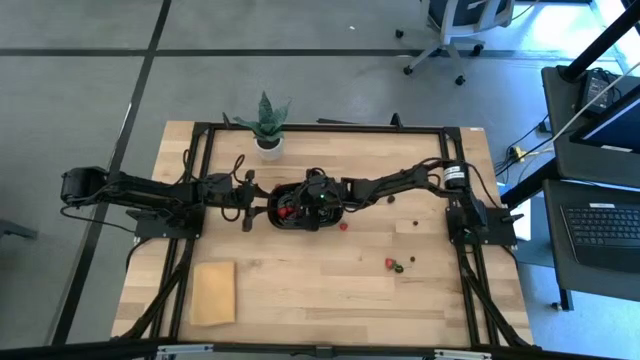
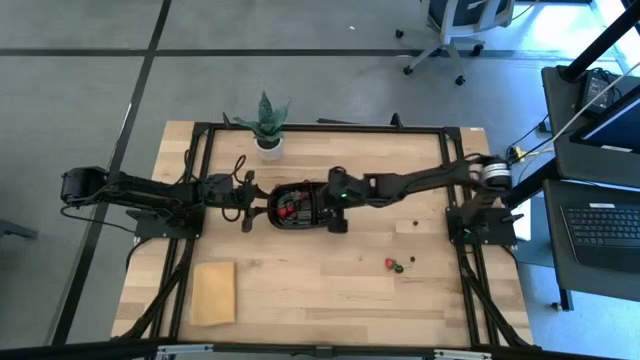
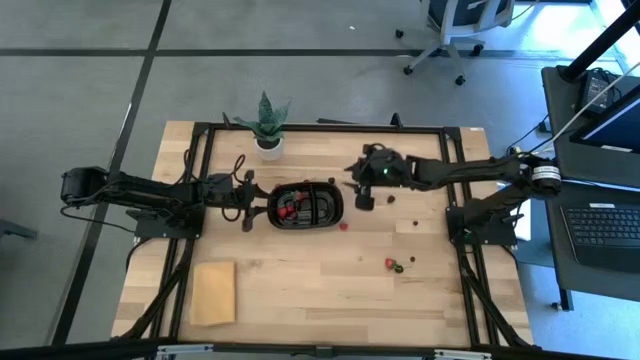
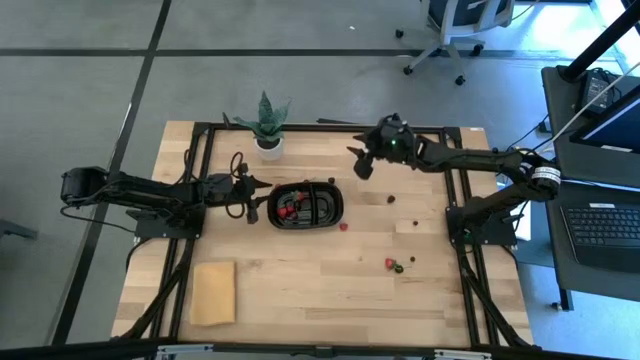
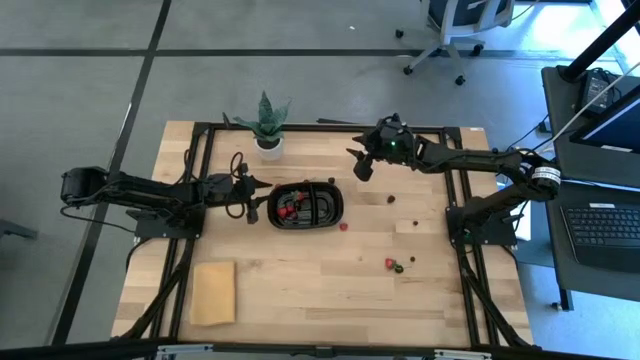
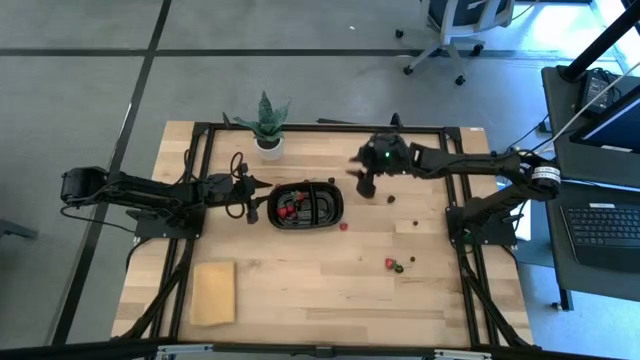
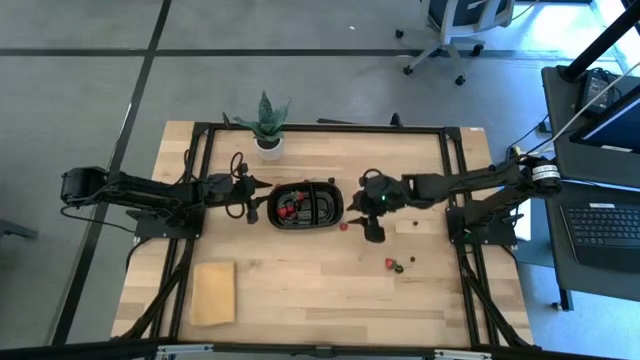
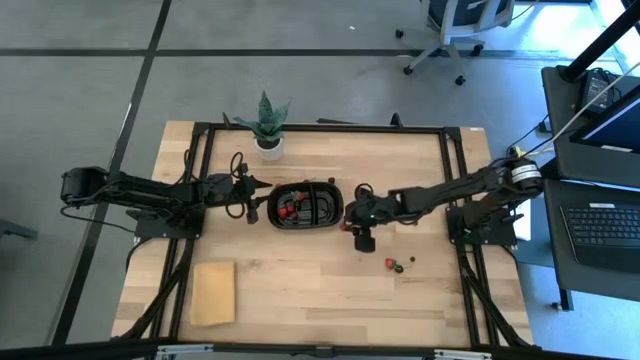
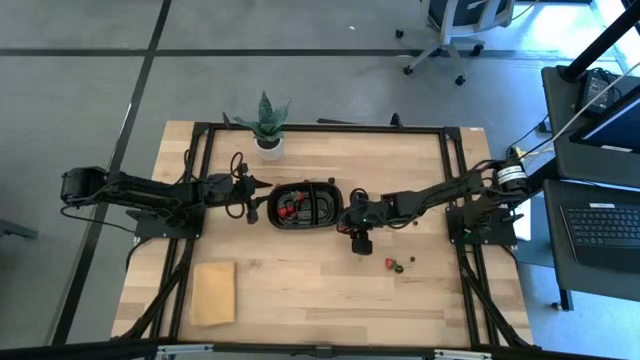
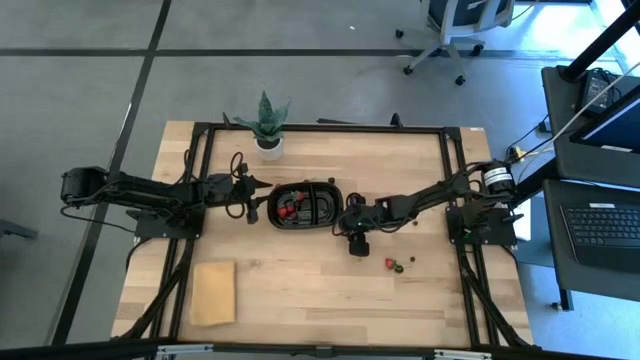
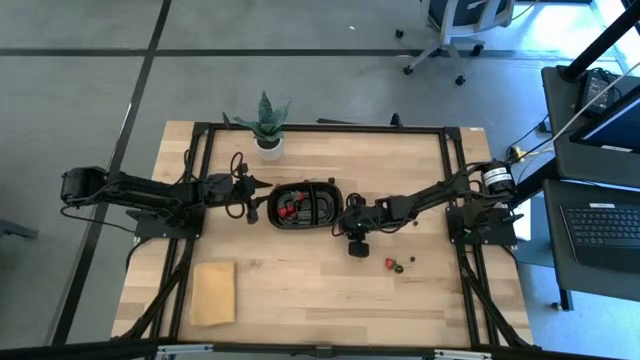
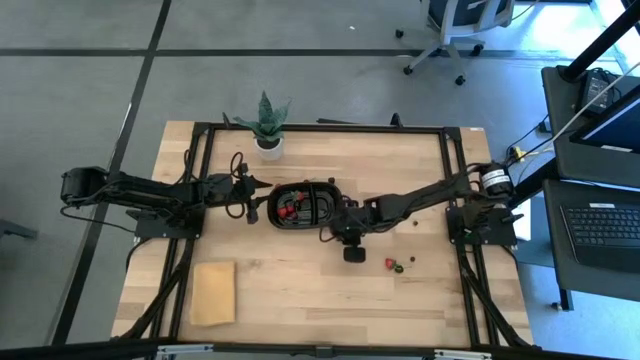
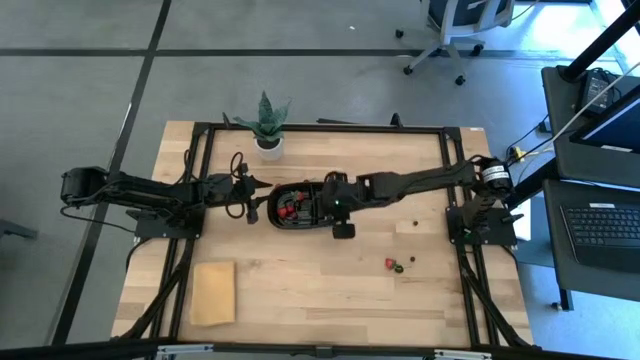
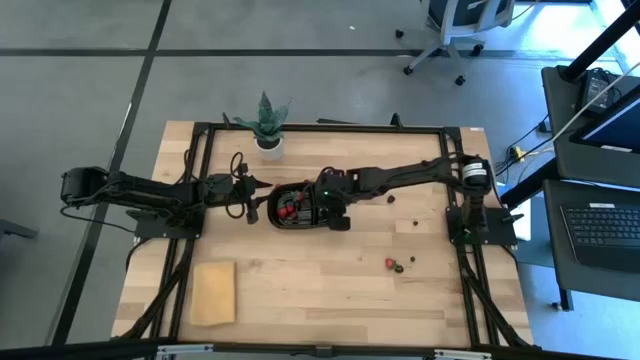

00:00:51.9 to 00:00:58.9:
Task: Pick and placing Produce into tupperware
Put the bottom red raspberry into the black bin

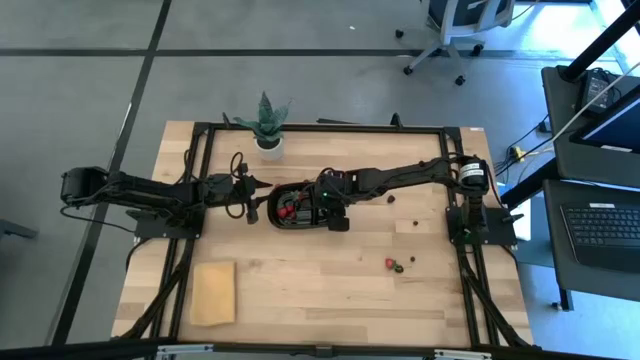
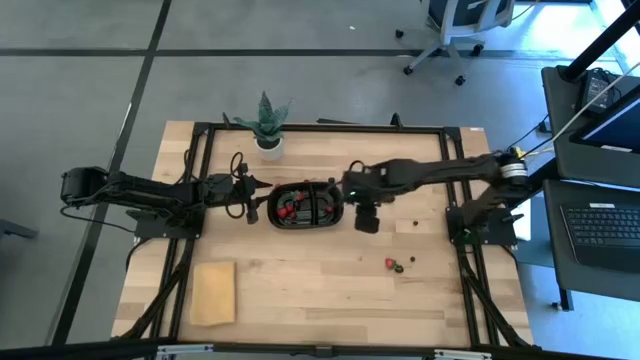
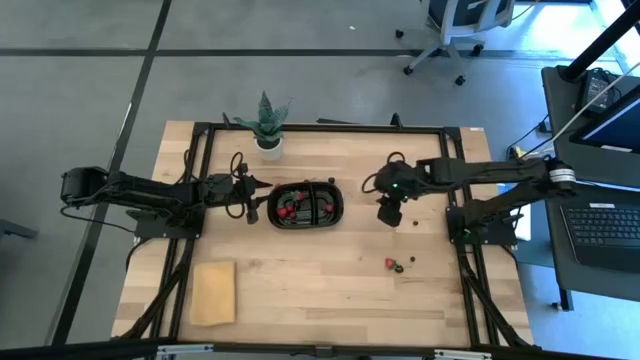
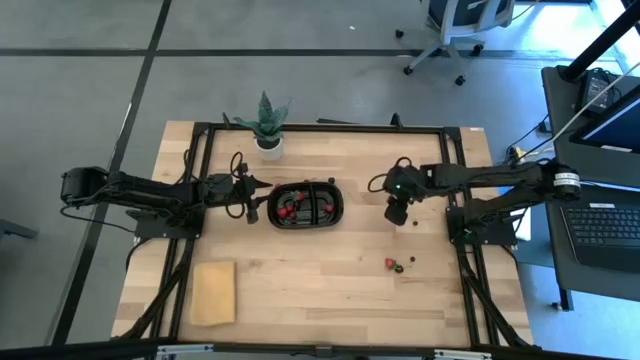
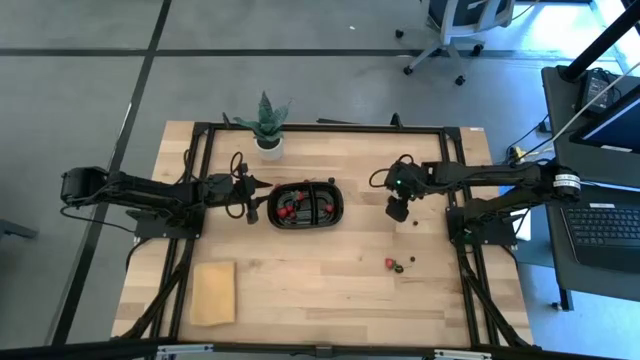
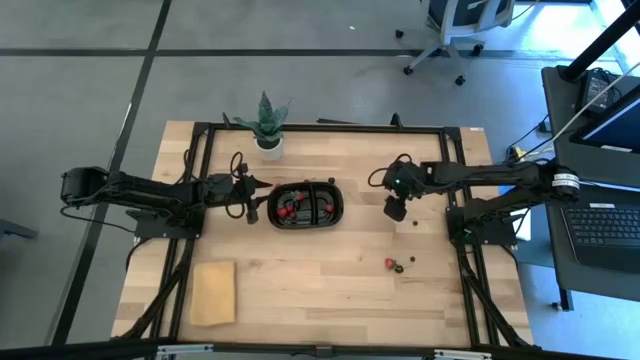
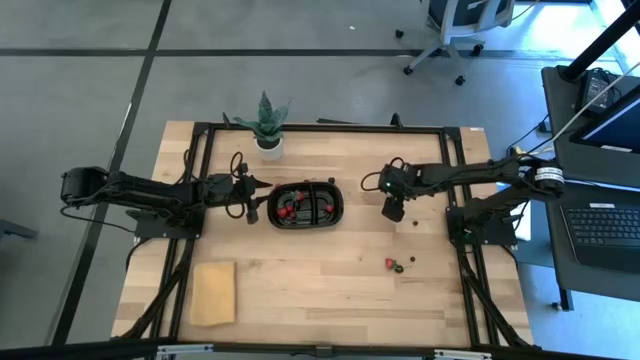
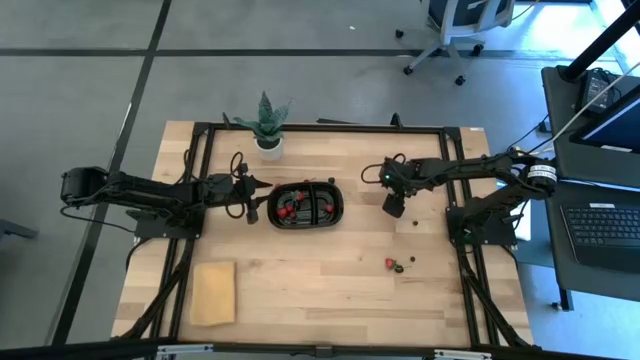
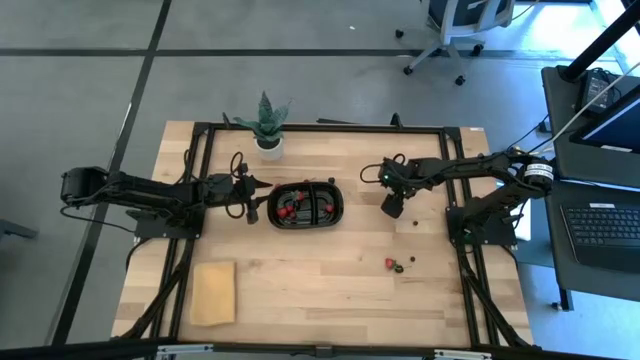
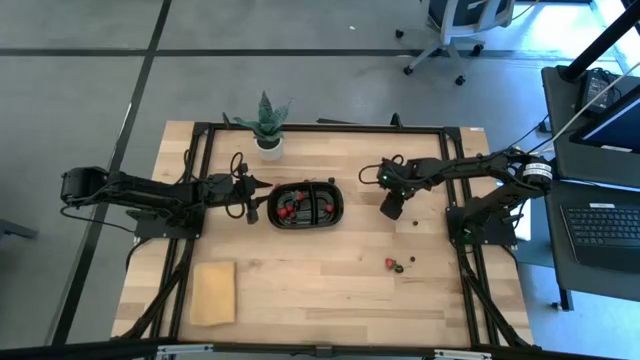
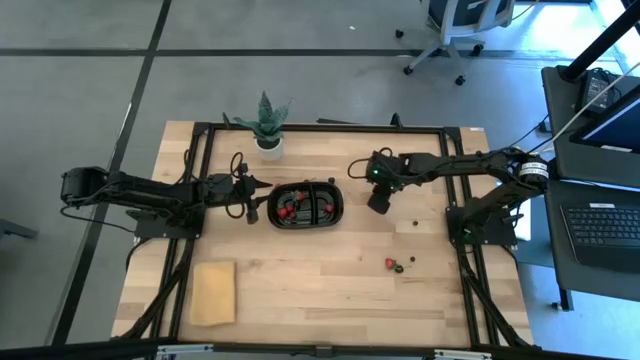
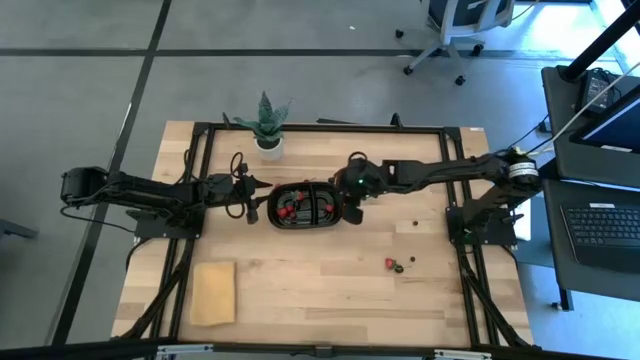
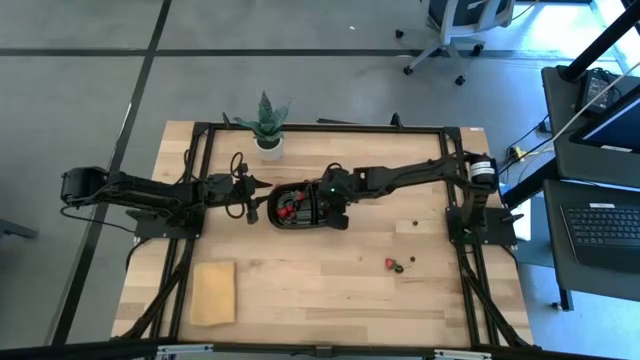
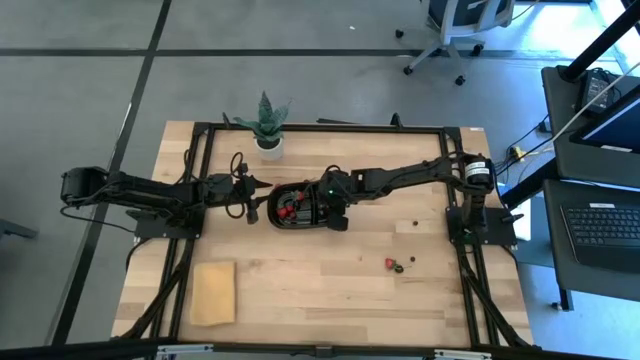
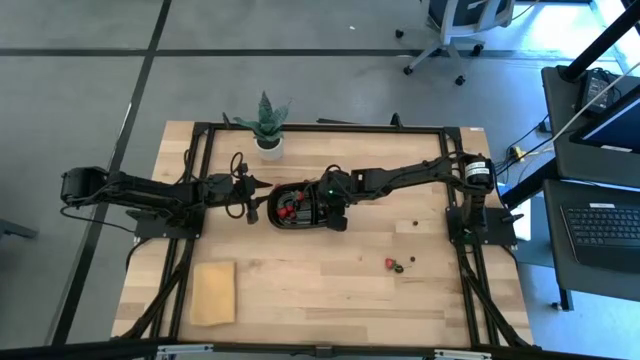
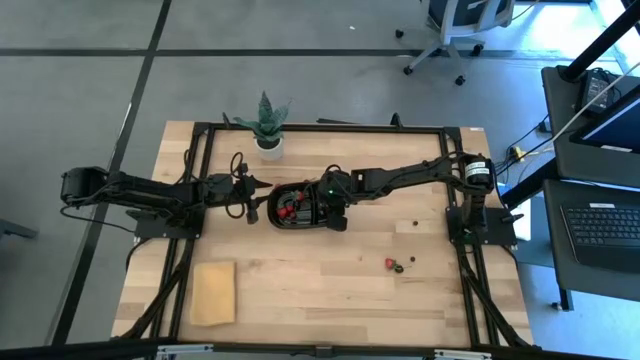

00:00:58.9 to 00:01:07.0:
Put the right blackberry into the black bin

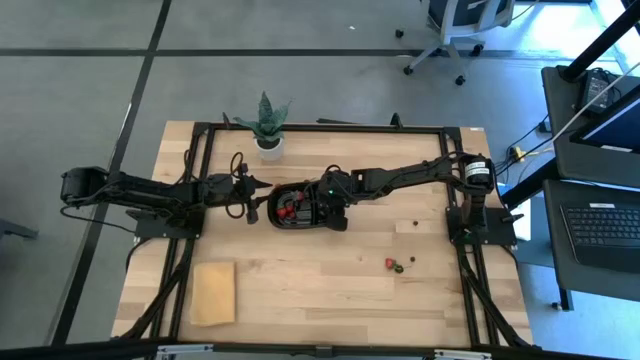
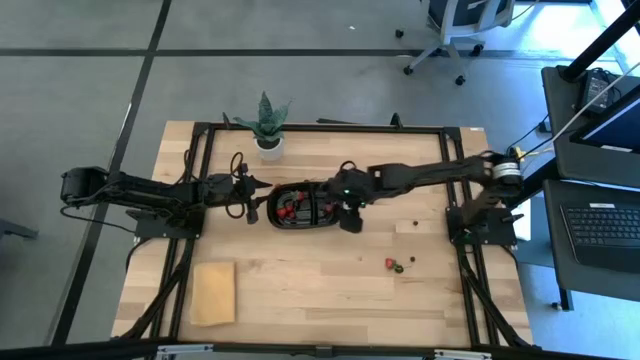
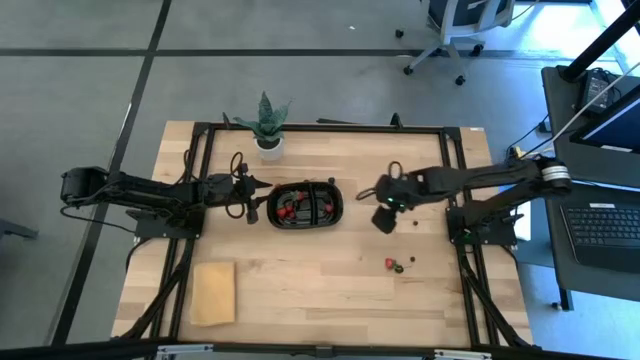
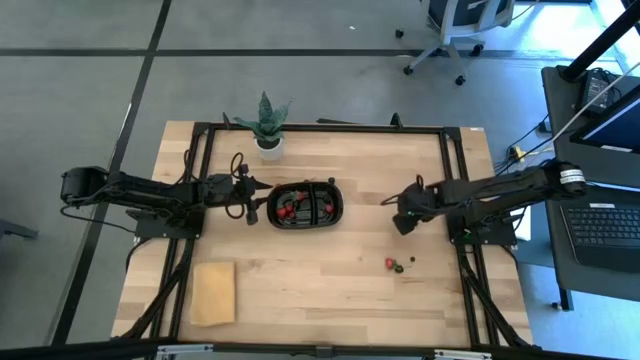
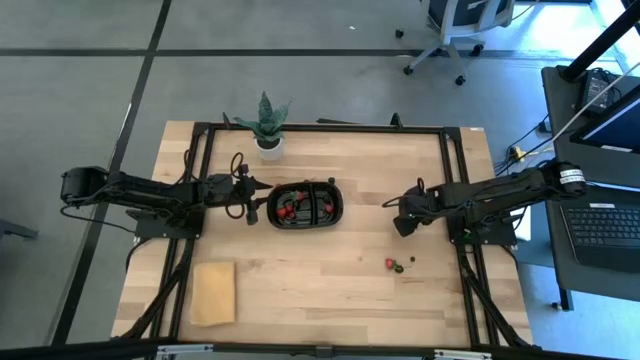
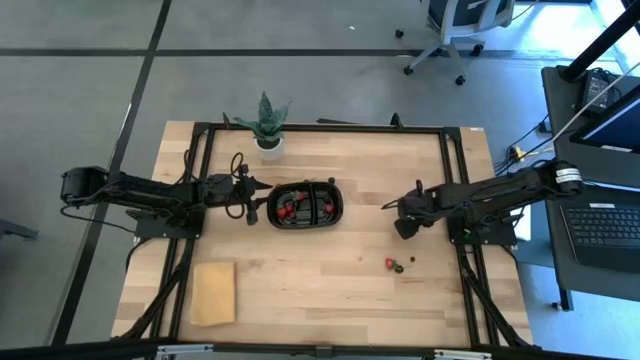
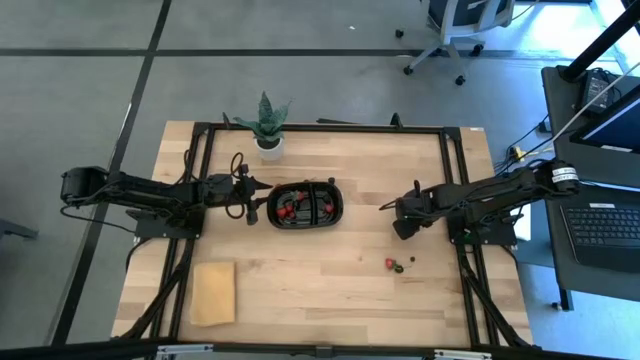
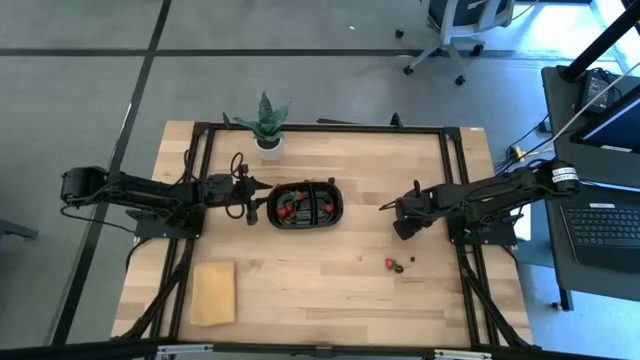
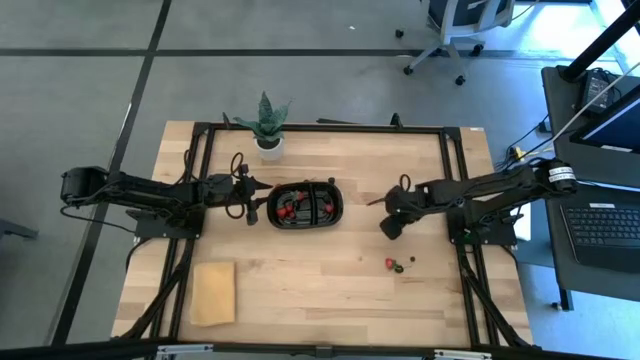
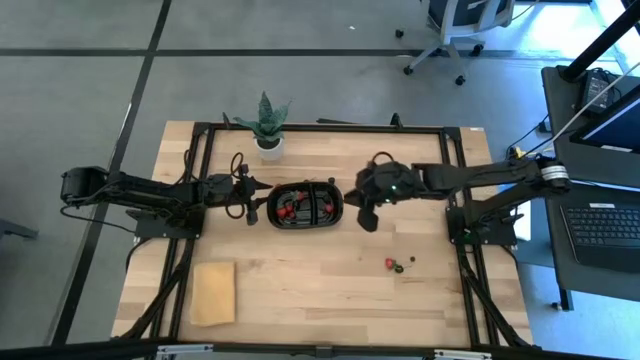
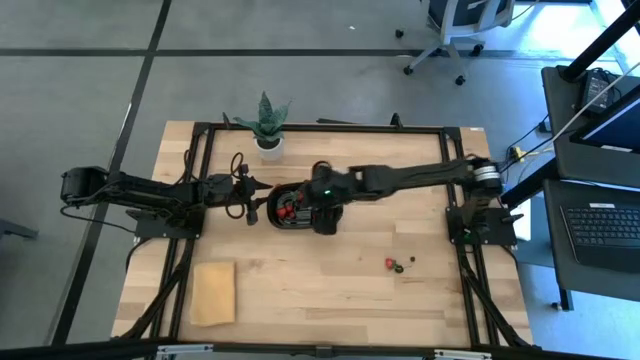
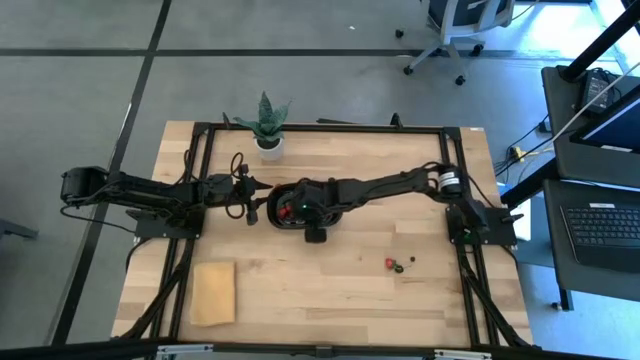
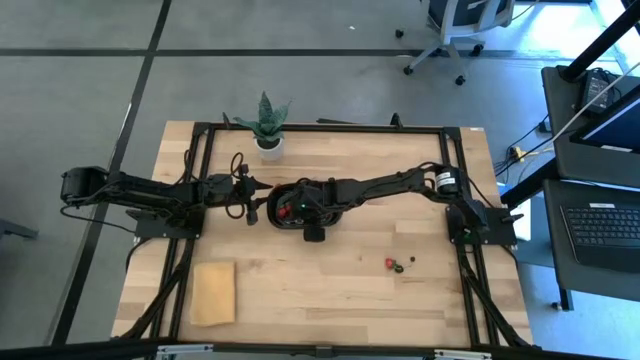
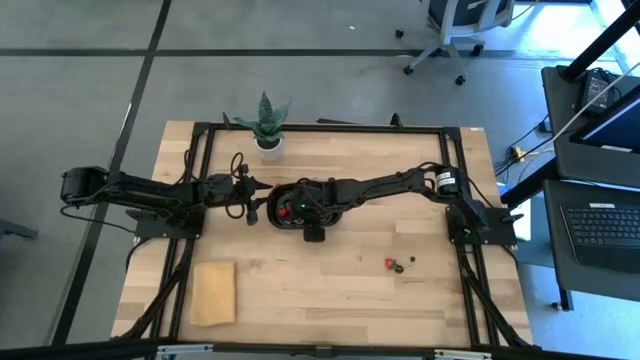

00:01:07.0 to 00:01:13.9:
Put the top blueberry into the black bin
